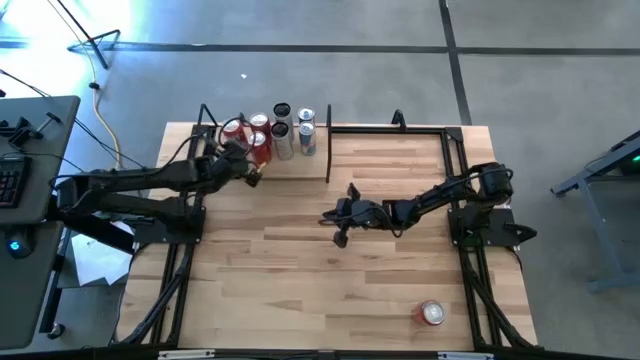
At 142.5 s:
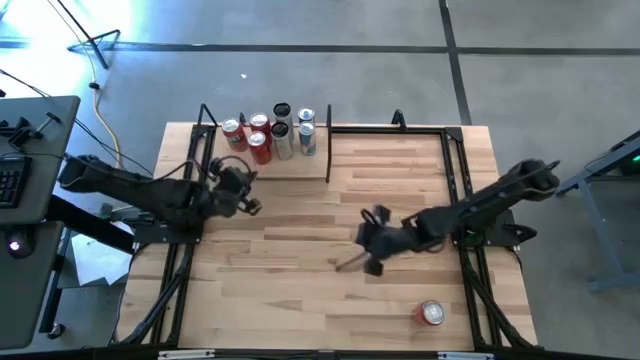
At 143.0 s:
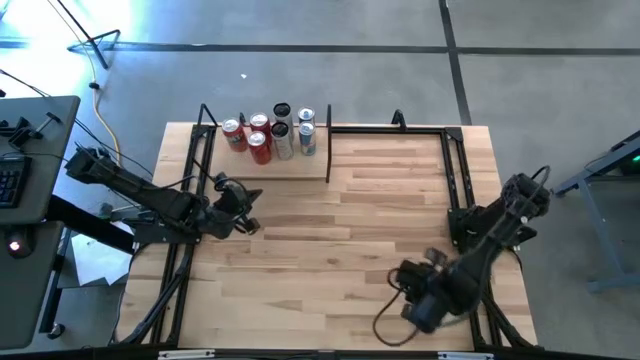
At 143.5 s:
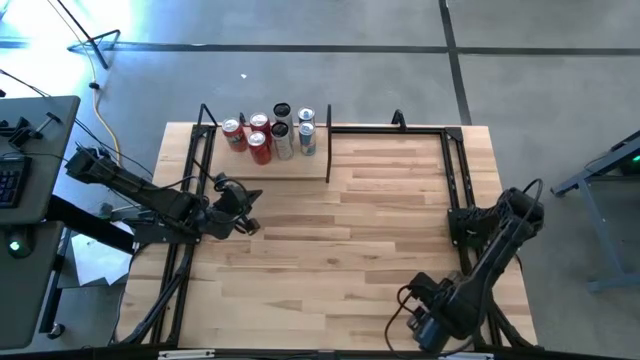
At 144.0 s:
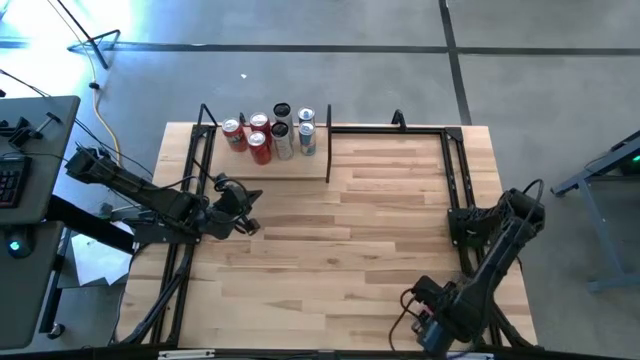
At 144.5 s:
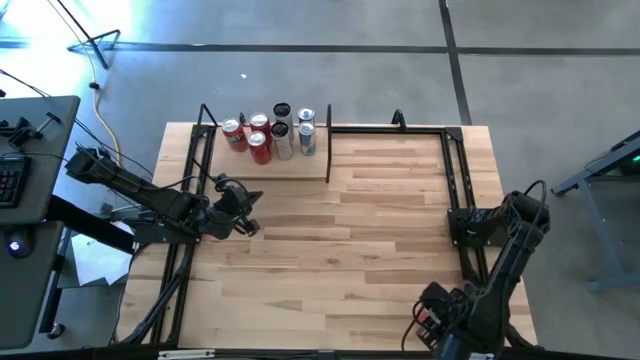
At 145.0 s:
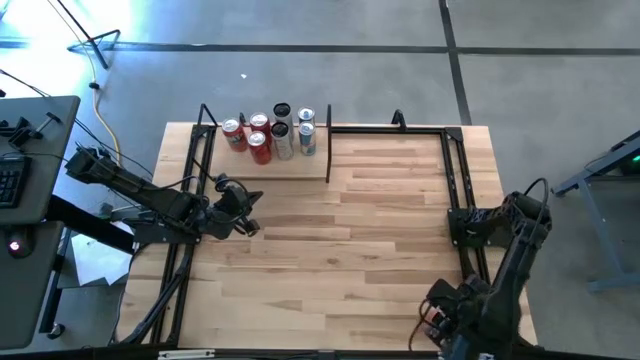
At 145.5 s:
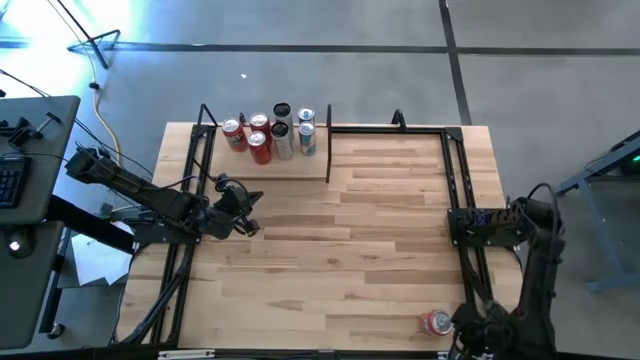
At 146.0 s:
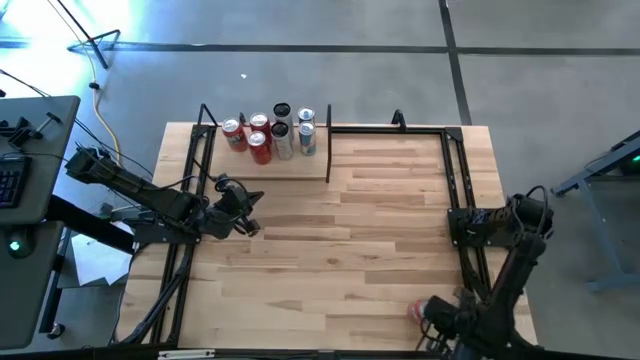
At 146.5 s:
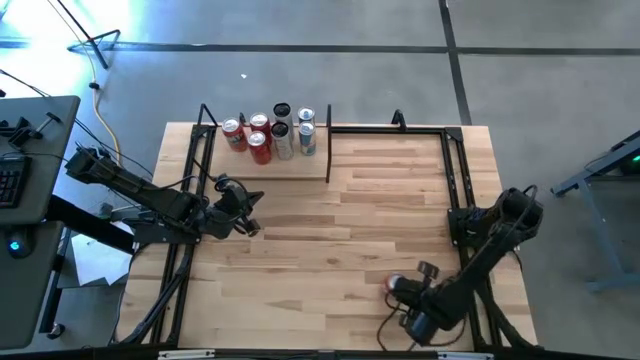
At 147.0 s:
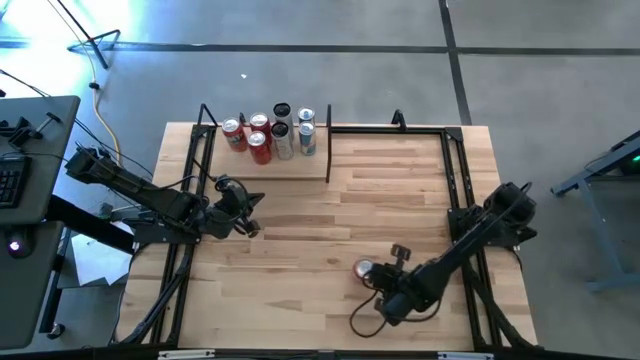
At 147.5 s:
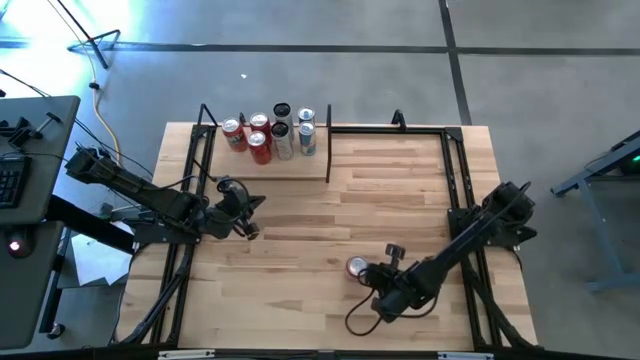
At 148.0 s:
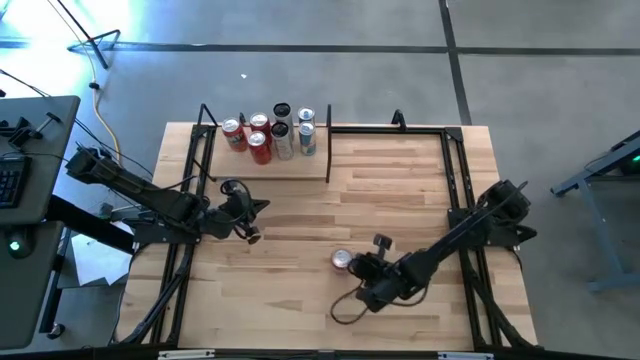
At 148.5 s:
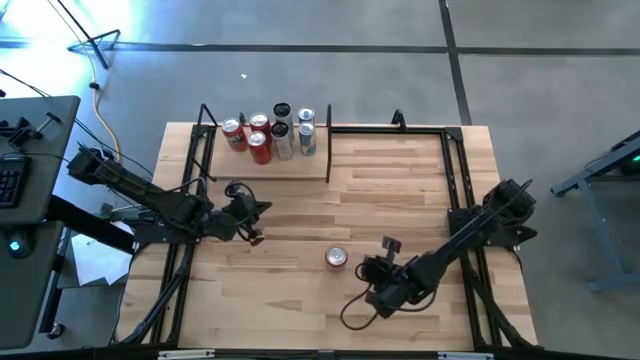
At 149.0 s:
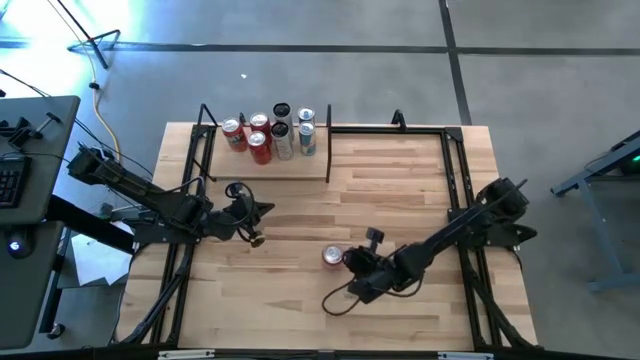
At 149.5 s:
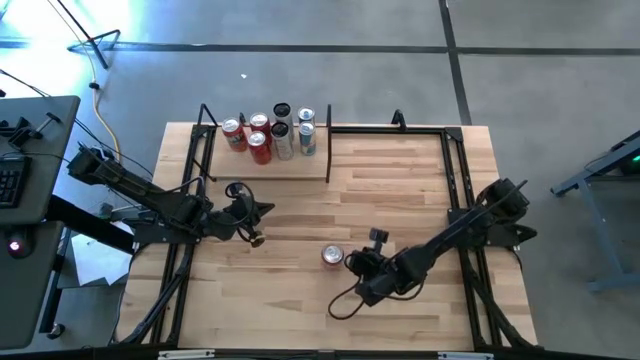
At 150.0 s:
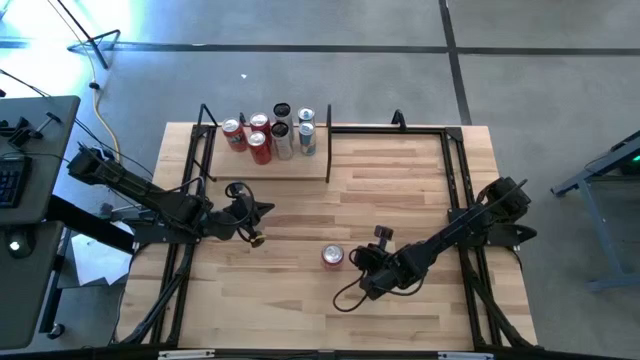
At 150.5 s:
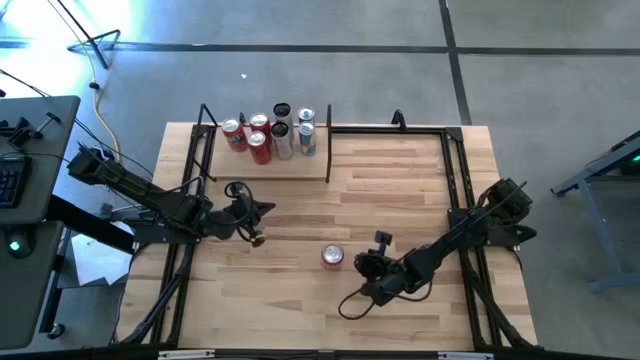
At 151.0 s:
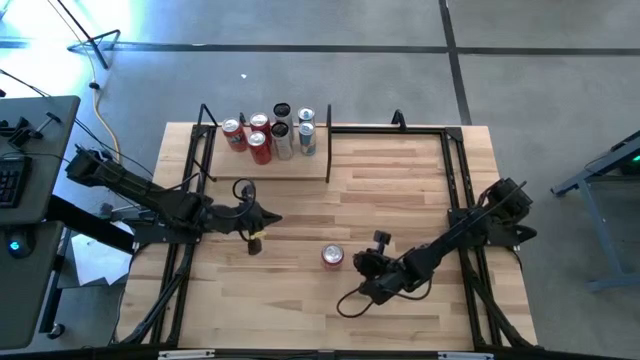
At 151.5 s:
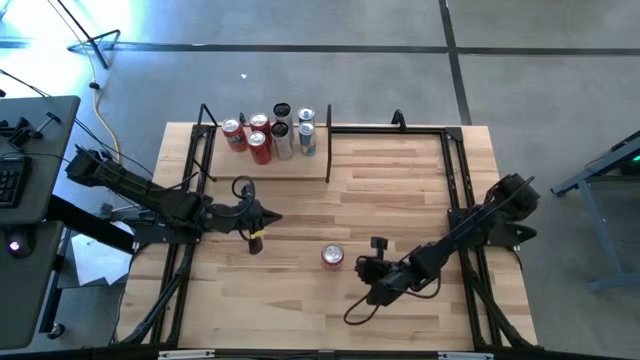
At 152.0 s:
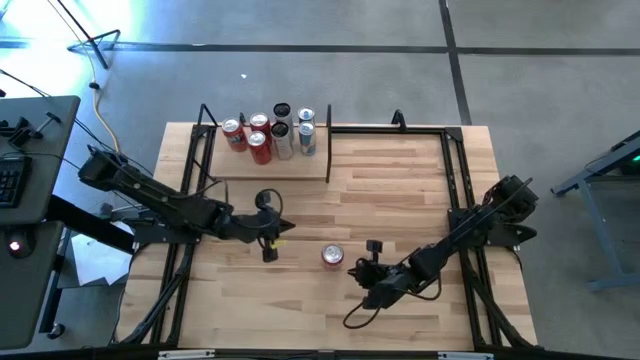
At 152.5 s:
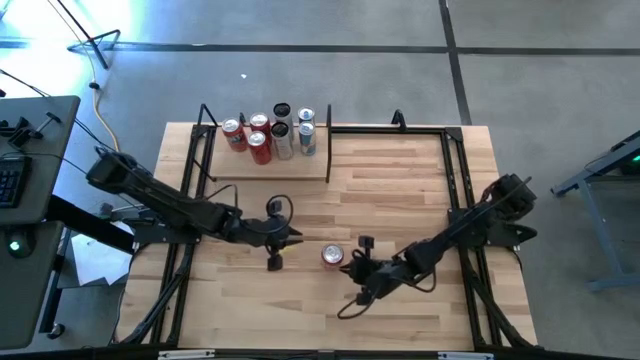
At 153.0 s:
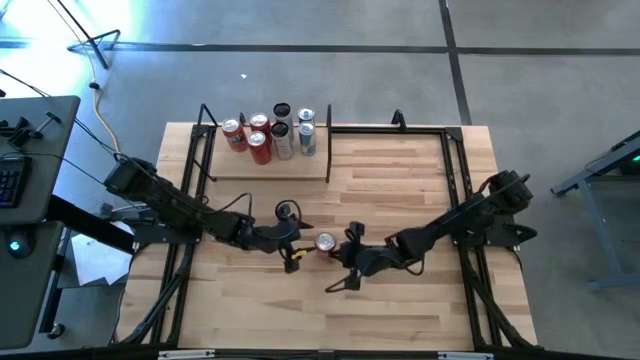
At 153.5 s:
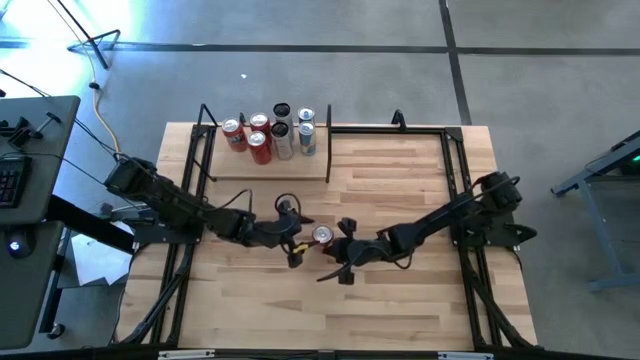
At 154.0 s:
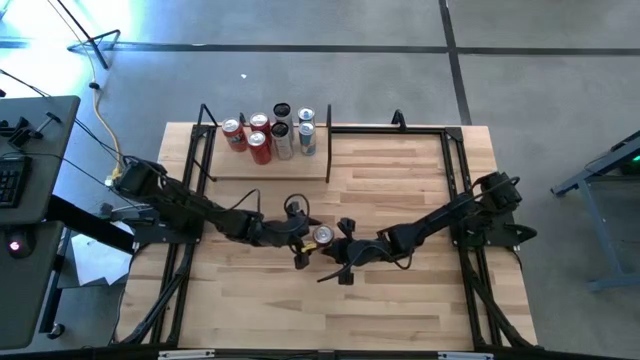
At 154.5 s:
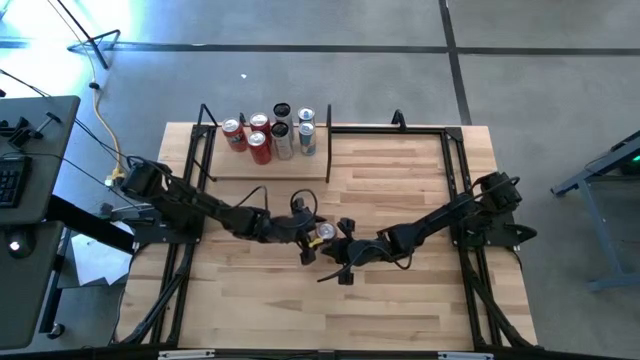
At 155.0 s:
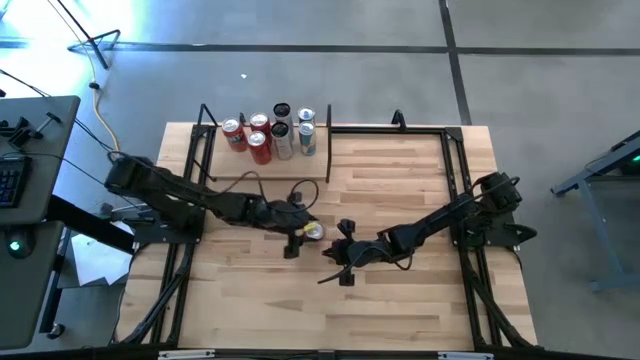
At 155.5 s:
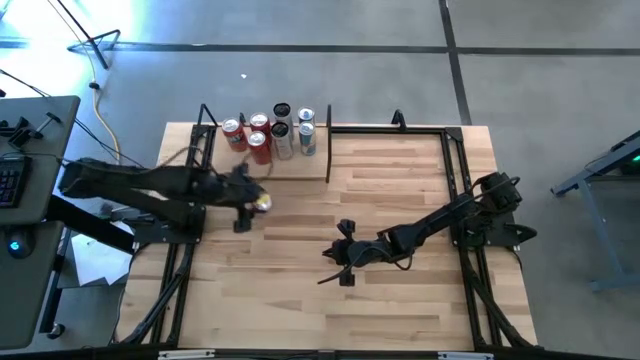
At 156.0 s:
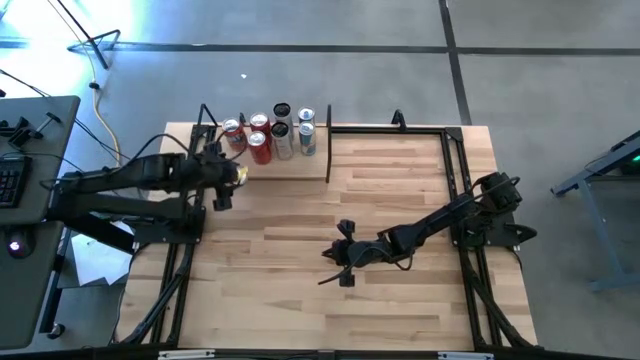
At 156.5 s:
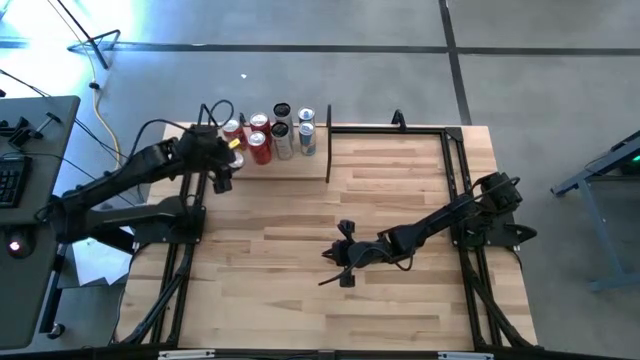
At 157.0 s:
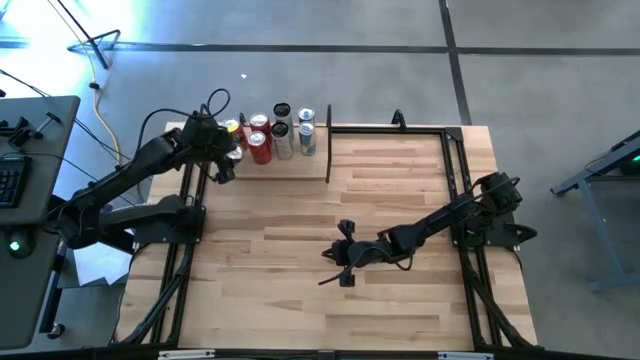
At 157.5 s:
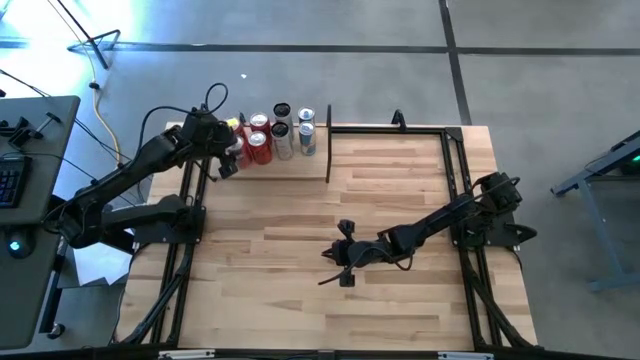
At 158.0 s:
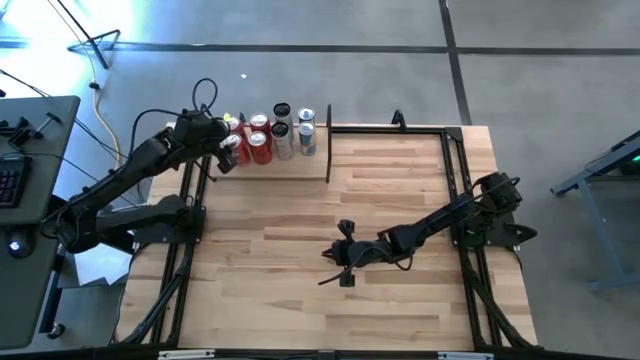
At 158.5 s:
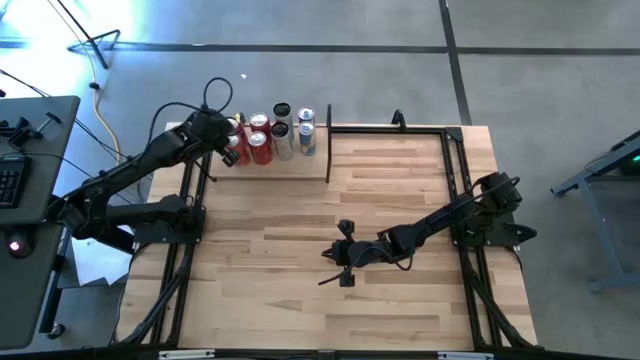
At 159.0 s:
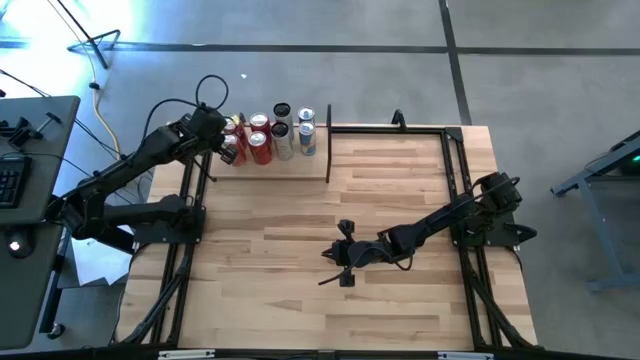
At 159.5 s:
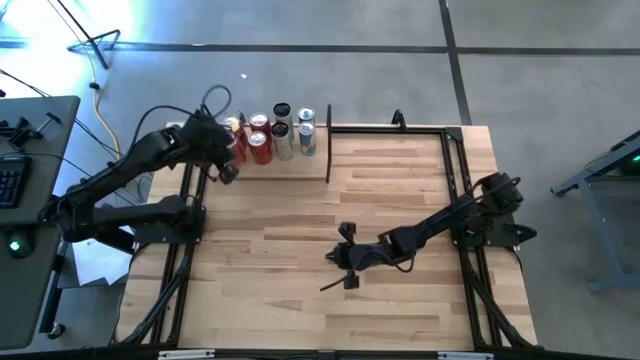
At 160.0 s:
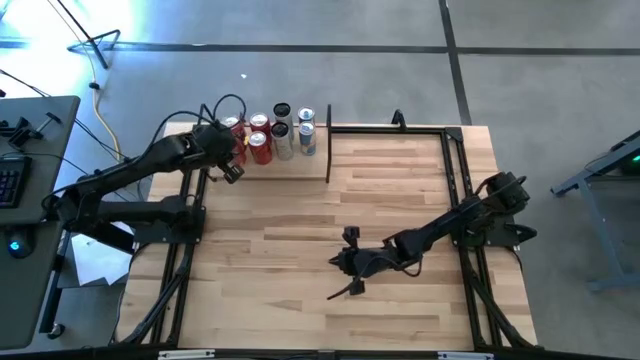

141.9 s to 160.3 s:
Task: Place canned beverage on shelf
Put the red soda can on the shelf aligned with the other red soda can

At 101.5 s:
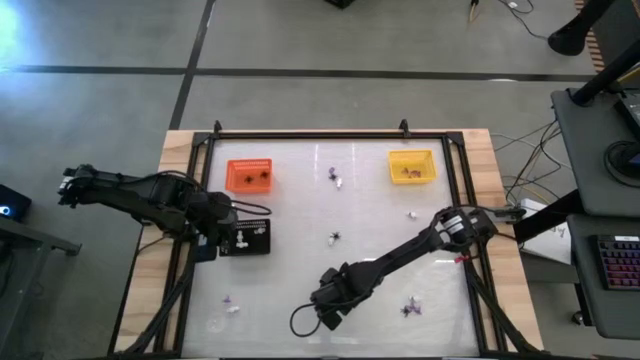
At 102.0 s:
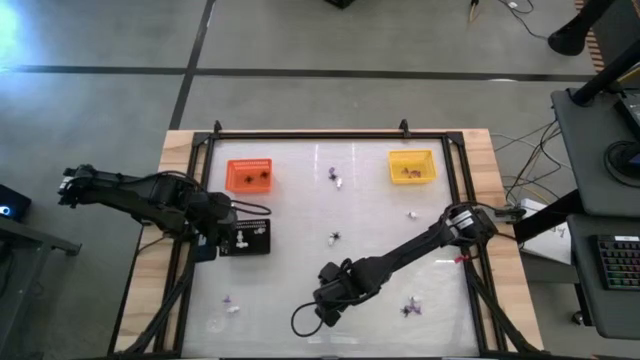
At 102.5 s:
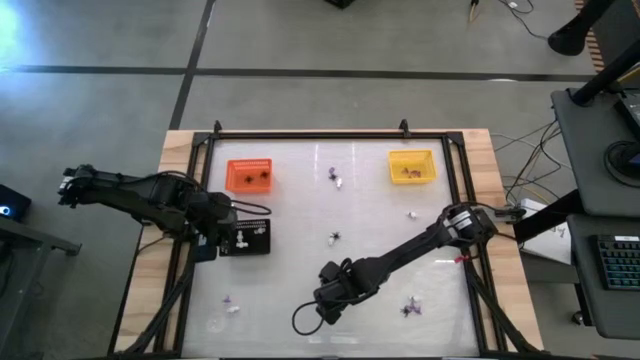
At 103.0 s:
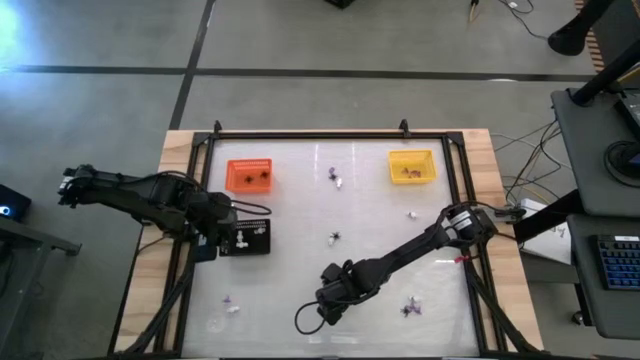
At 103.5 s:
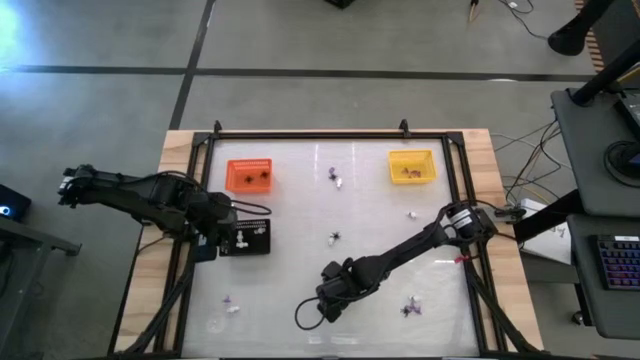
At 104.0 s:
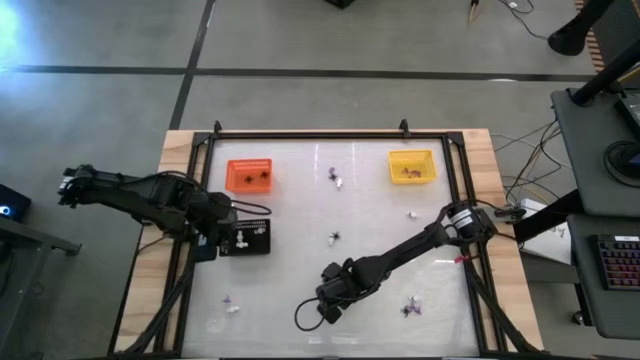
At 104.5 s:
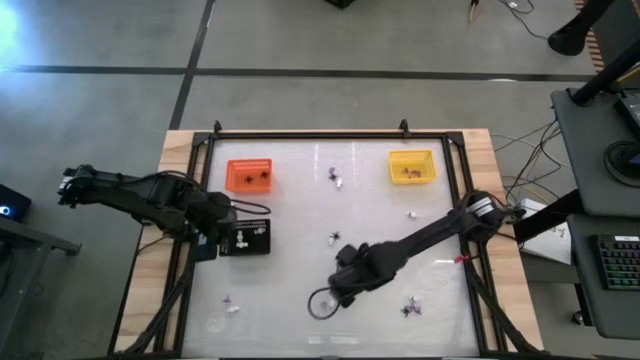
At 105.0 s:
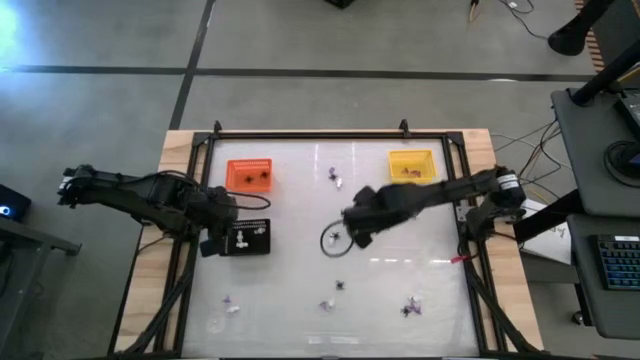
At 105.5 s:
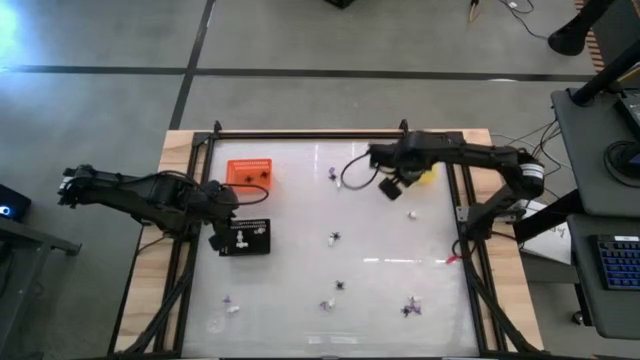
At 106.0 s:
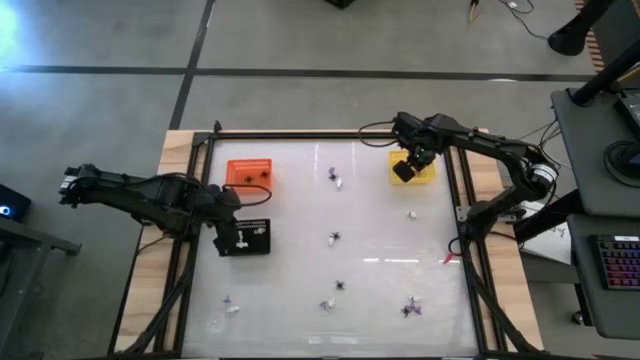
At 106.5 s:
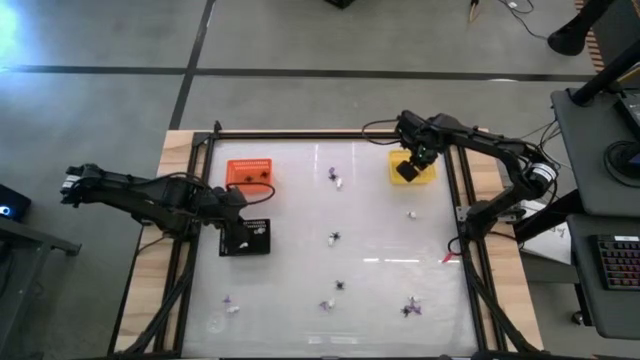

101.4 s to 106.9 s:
Task: Sort Halloween decoration
Put the purple witch hat toy into the yellow bin
